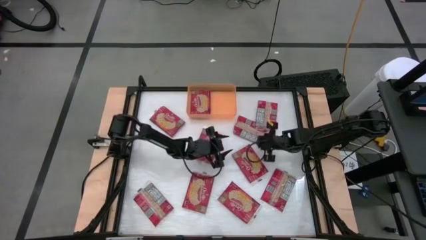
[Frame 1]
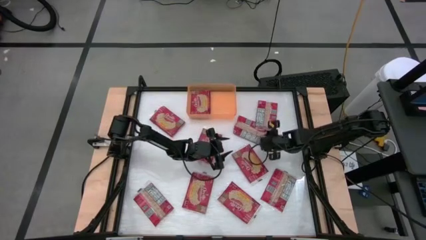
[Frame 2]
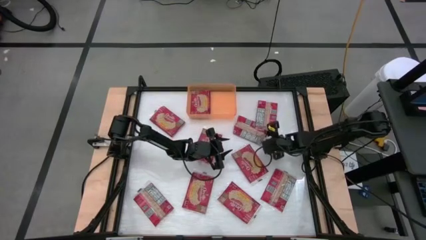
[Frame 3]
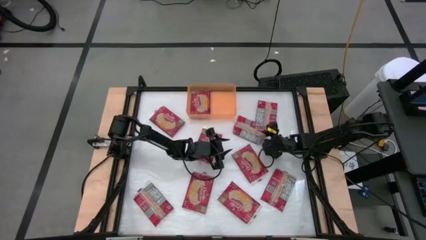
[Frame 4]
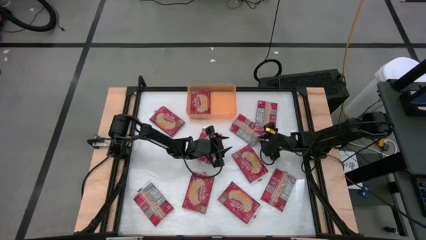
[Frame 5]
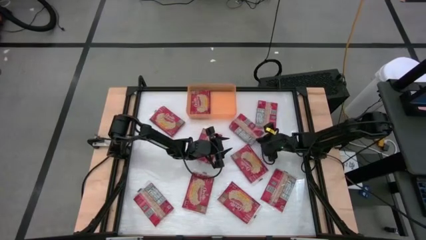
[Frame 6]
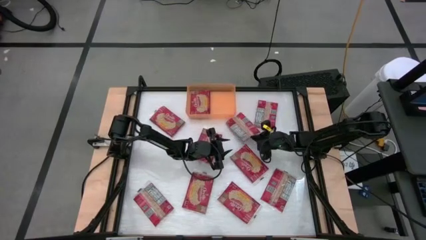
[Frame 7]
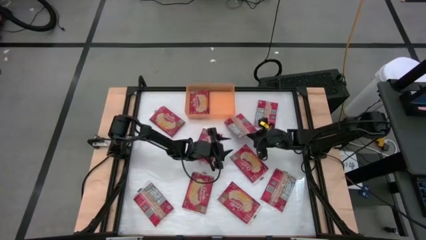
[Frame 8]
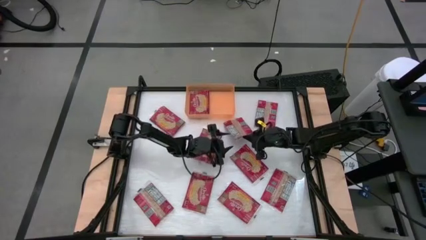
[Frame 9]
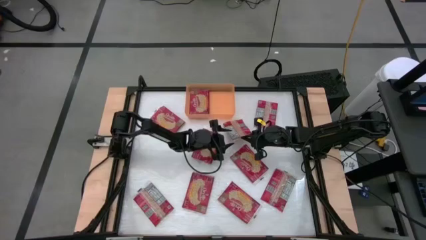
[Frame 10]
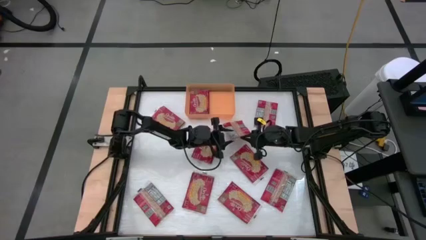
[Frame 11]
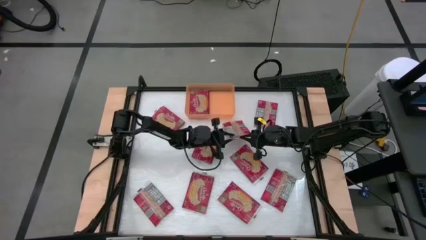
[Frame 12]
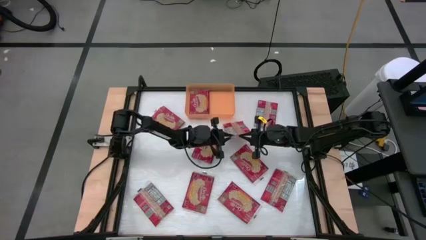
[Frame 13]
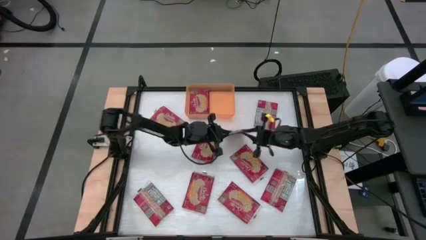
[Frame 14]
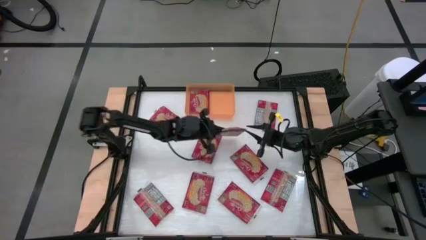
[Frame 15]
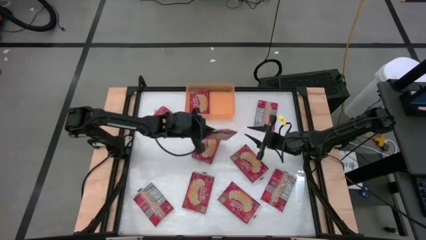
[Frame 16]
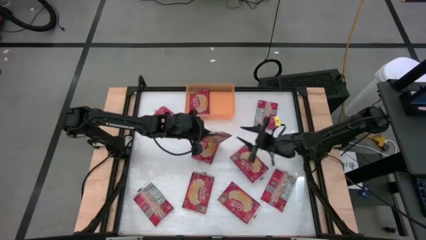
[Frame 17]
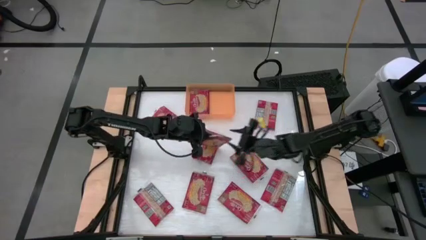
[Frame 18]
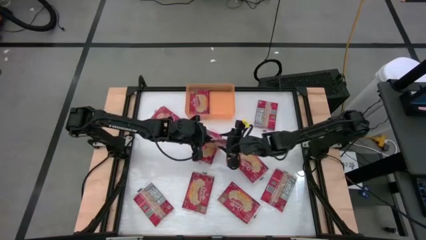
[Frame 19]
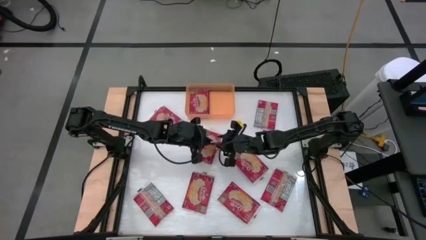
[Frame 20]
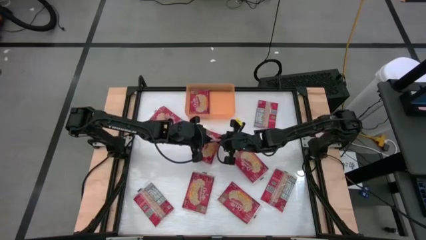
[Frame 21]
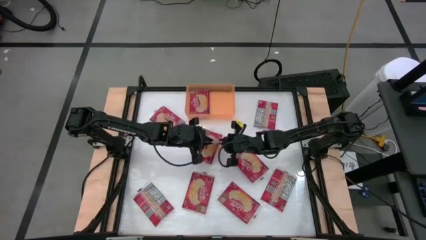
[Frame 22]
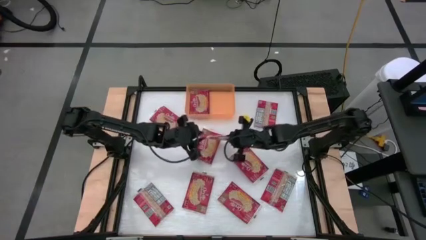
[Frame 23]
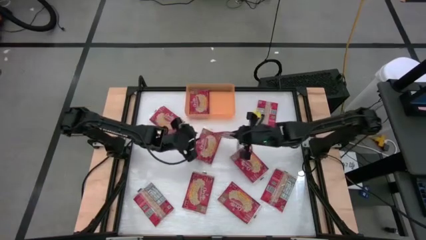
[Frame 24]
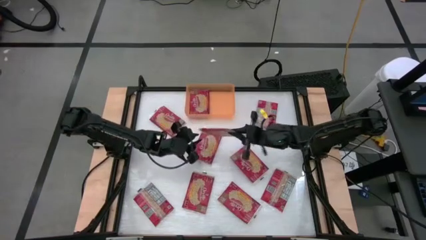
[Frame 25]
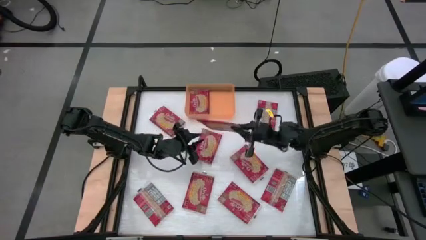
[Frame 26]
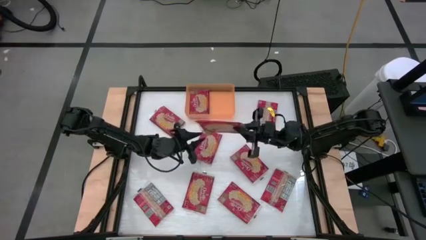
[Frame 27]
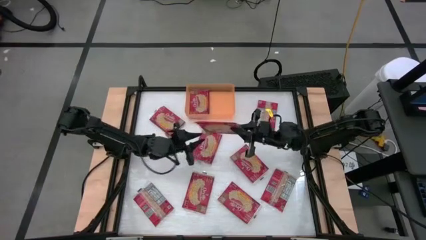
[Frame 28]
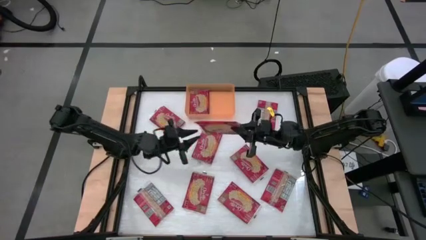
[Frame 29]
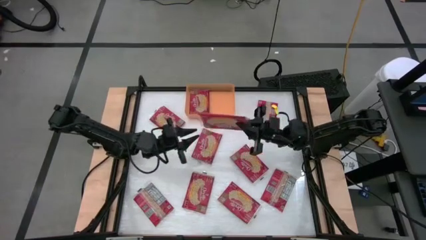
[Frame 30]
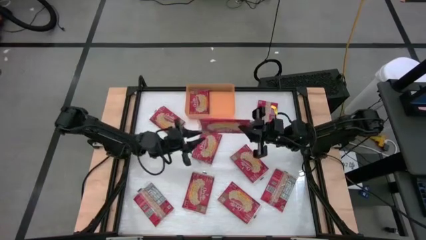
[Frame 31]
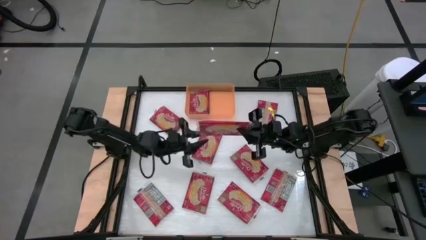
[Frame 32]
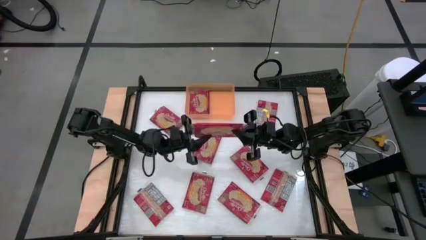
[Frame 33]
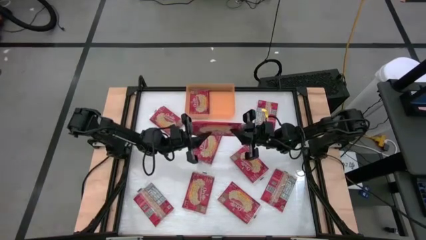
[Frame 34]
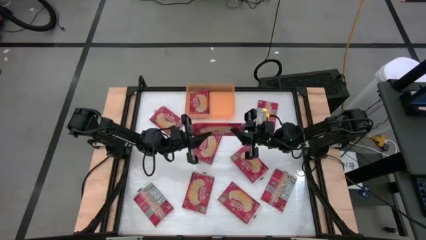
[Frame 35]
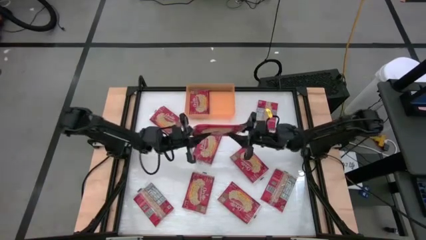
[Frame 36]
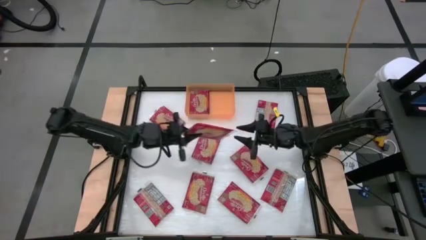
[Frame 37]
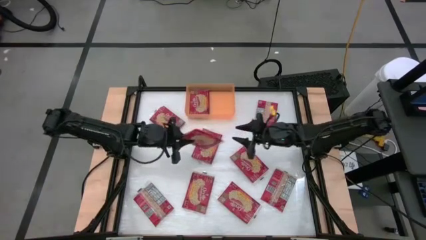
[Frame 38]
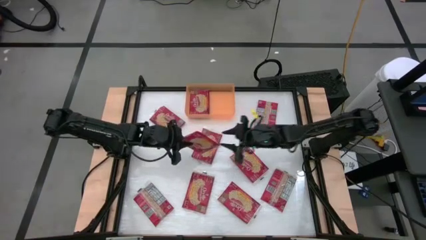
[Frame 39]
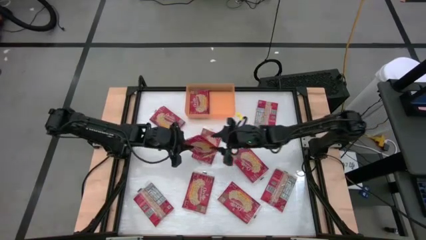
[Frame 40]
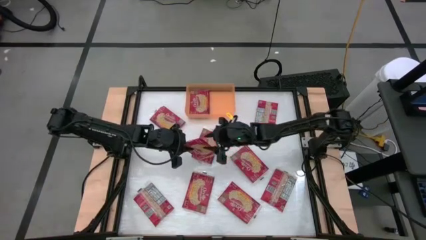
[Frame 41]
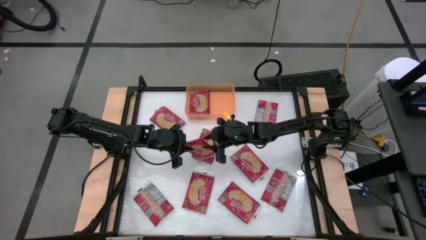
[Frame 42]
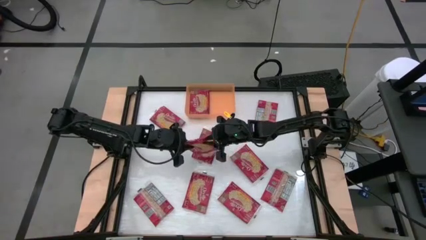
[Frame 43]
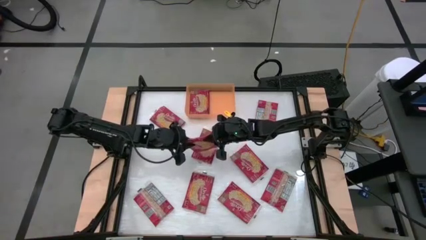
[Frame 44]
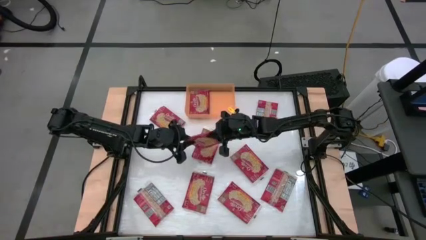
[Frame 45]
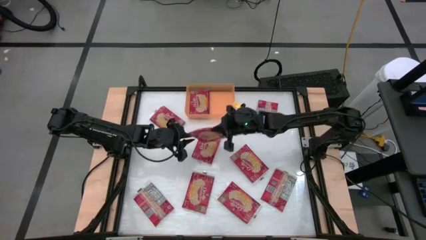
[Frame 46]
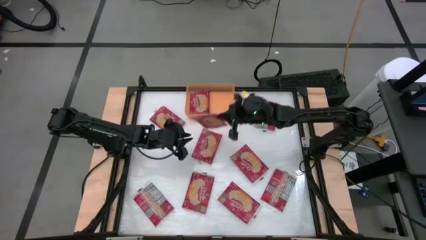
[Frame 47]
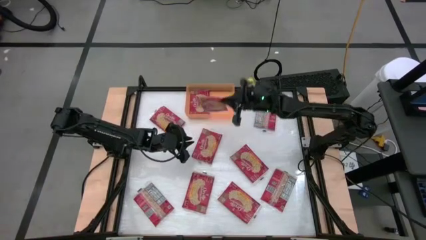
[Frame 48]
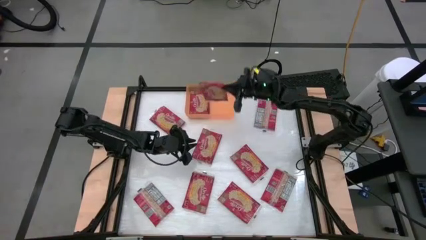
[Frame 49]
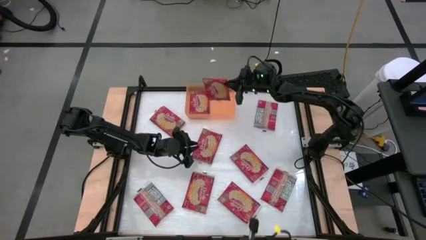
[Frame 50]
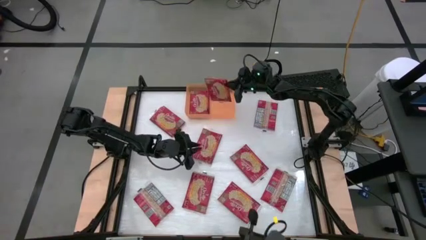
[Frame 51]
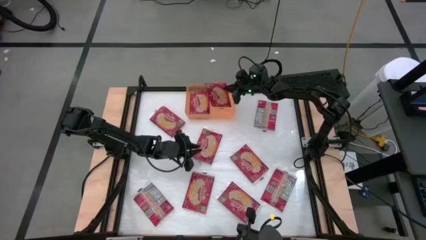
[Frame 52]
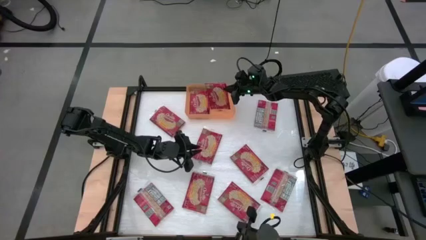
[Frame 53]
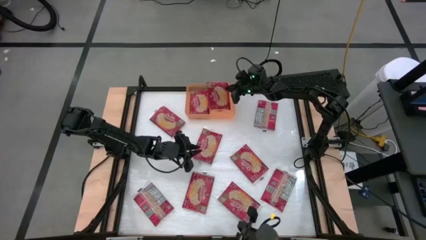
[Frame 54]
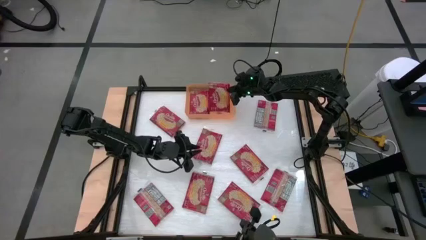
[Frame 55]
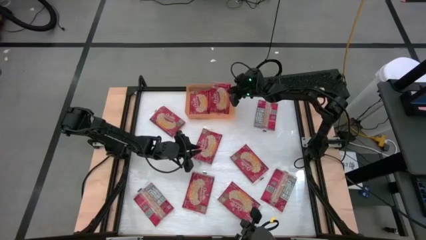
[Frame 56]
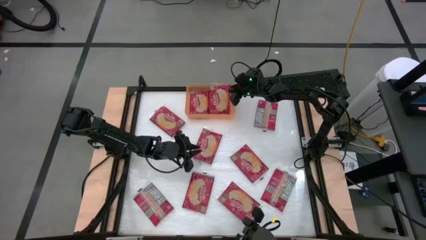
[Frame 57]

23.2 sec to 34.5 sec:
Task: Sort popcorn bags into baskets
Put the red popcorn bag into the orange bin

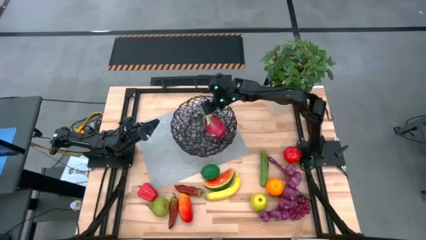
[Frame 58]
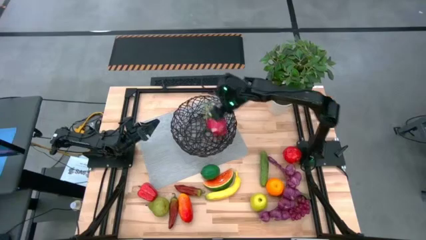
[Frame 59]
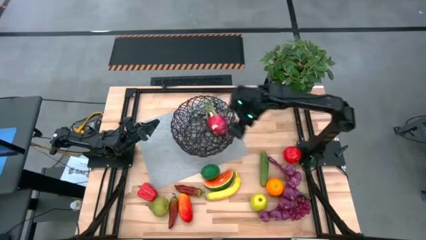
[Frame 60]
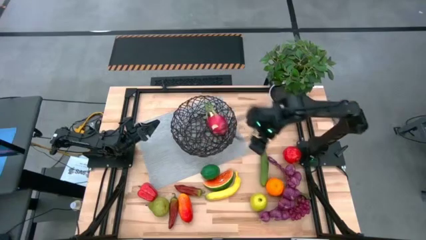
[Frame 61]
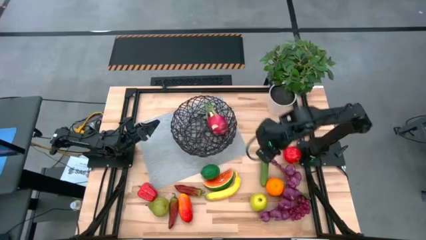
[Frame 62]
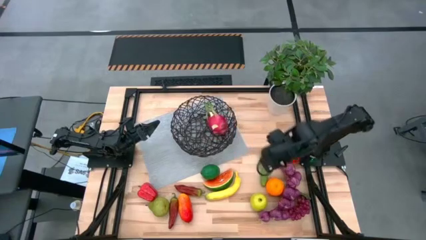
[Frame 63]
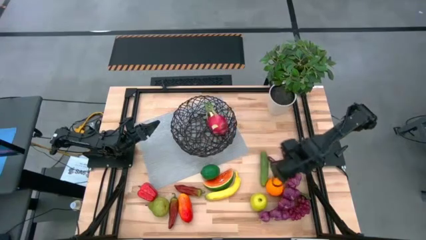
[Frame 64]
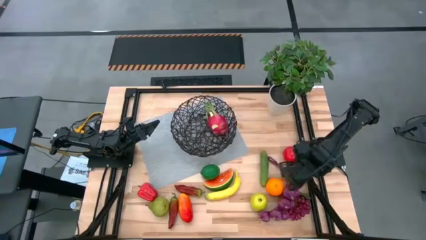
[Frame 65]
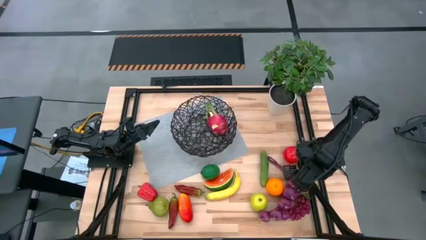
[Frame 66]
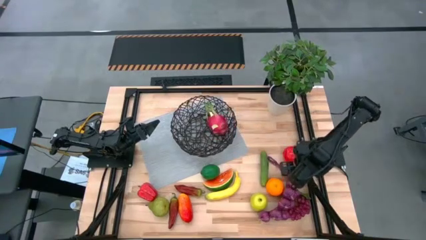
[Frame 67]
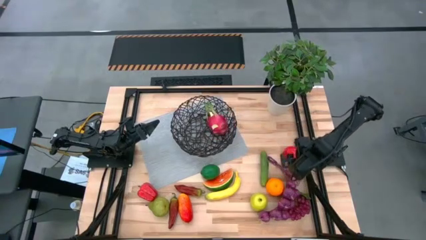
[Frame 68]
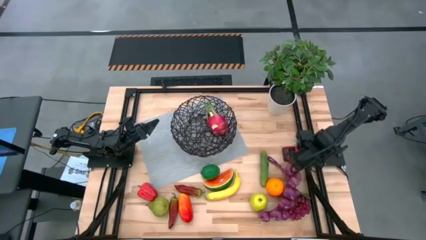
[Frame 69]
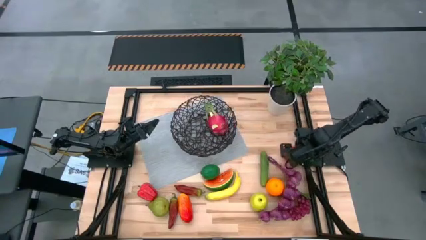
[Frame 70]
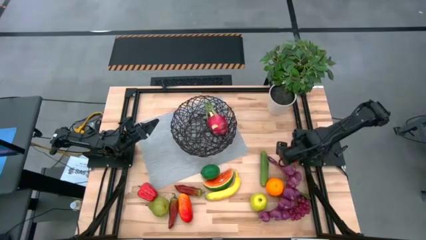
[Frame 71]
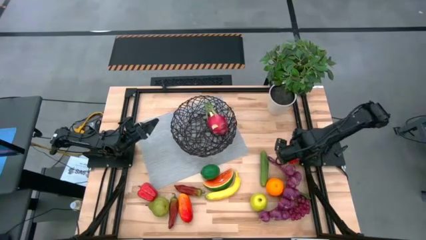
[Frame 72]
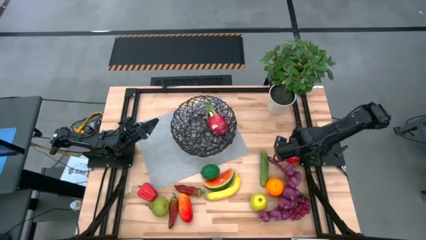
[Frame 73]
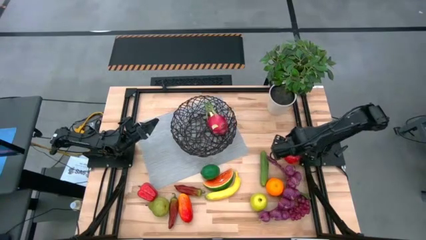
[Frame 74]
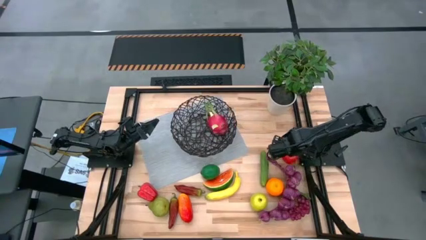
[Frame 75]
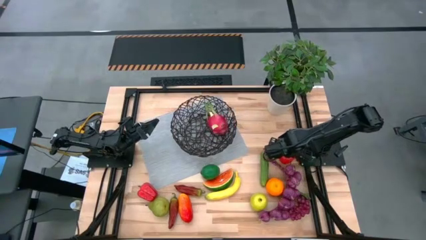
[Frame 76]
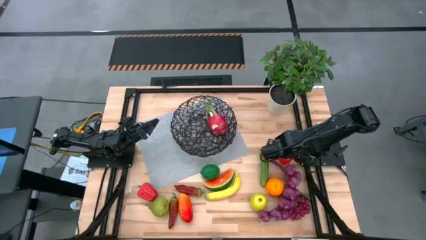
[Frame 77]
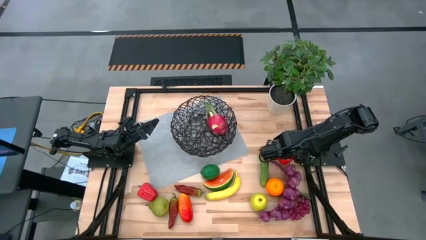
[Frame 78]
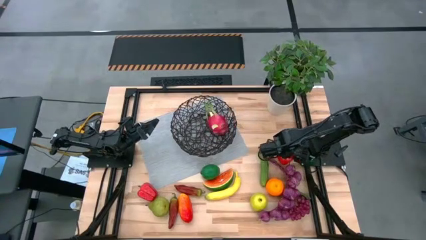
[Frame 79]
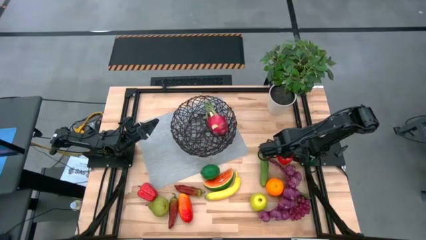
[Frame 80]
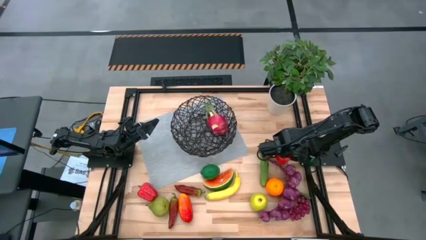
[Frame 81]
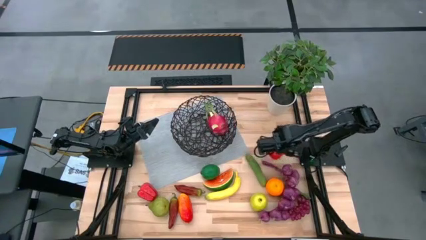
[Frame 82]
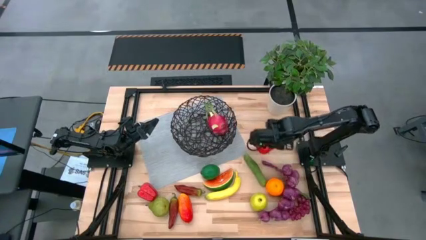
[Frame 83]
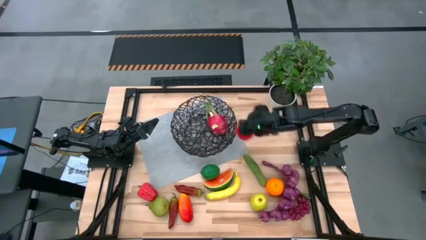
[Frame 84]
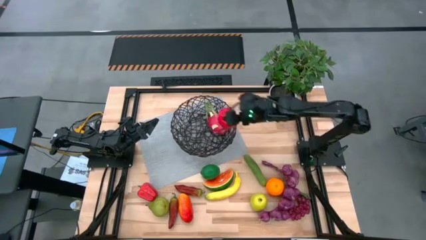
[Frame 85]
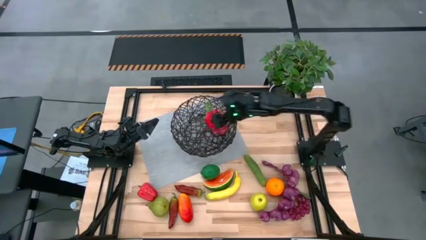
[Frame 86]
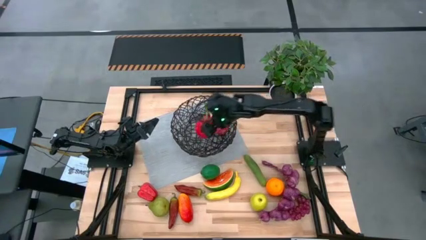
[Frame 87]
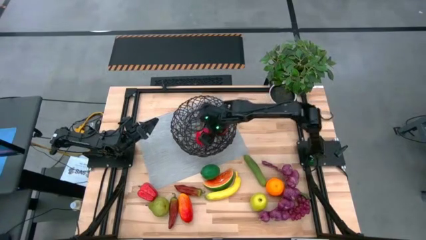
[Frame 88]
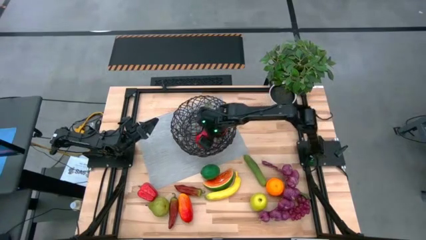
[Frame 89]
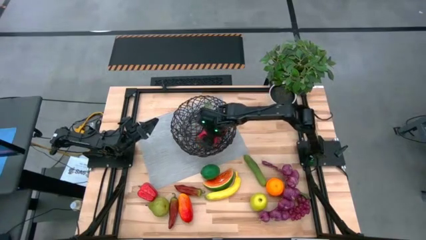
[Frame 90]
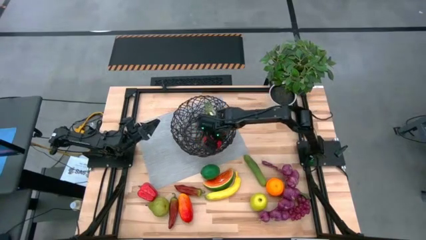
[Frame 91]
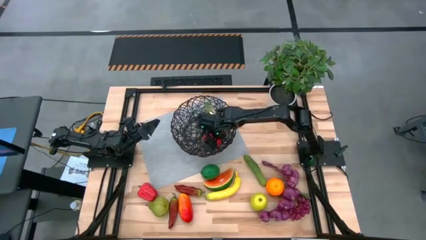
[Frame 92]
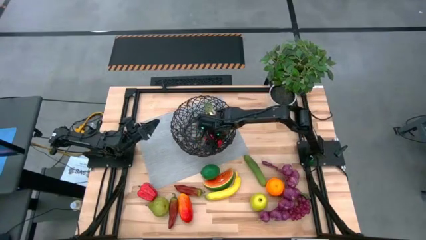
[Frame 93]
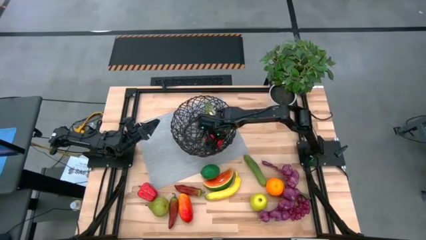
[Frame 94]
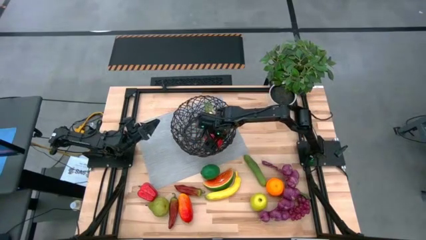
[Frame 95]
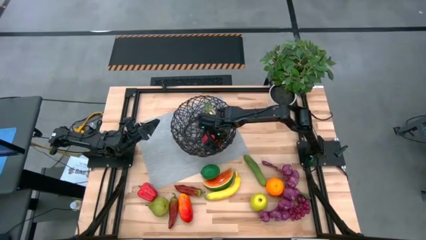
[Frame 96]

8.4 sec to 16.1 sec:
Task: Build produce basket
Put the red apple into the wire basket
